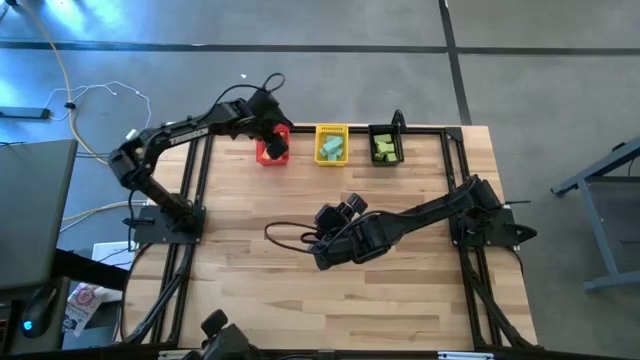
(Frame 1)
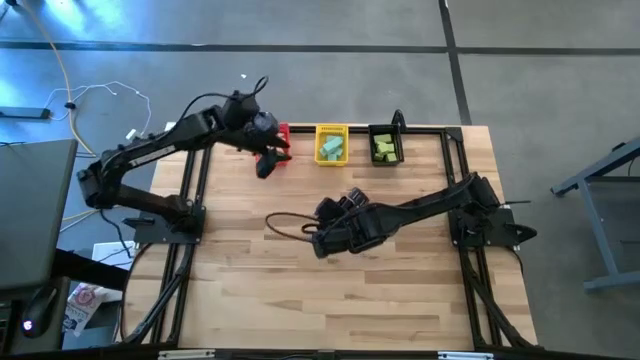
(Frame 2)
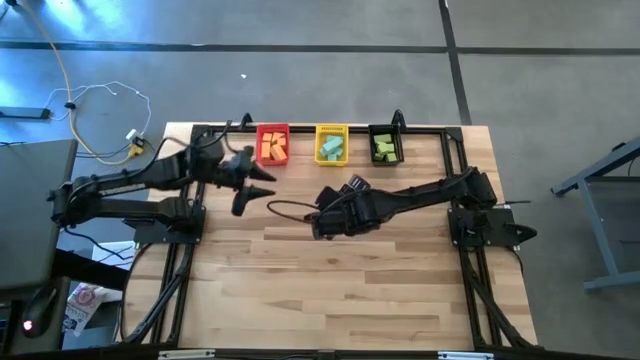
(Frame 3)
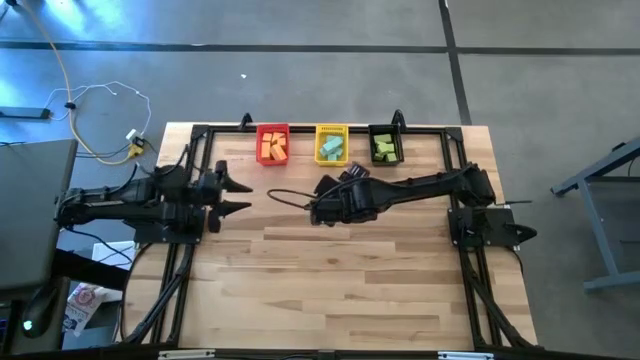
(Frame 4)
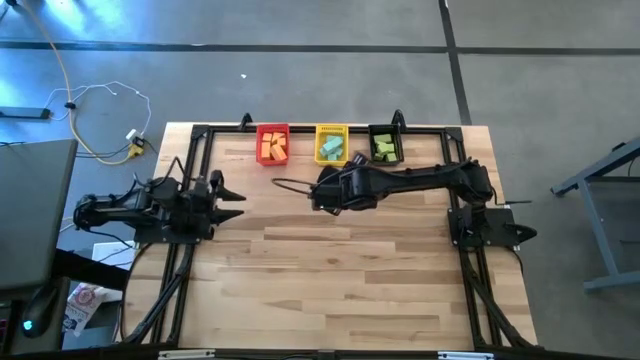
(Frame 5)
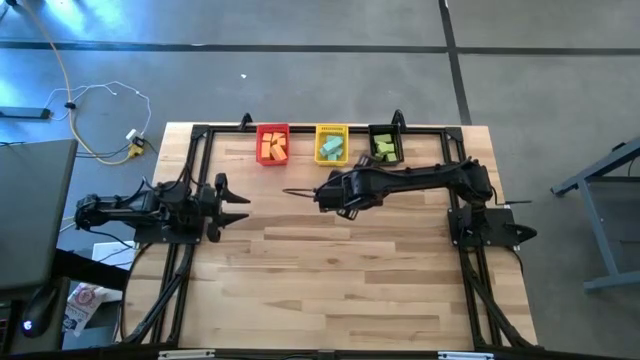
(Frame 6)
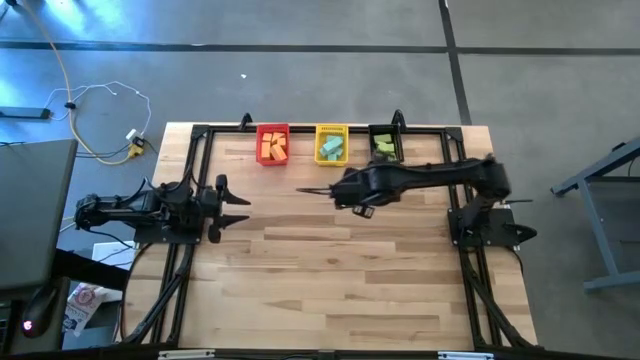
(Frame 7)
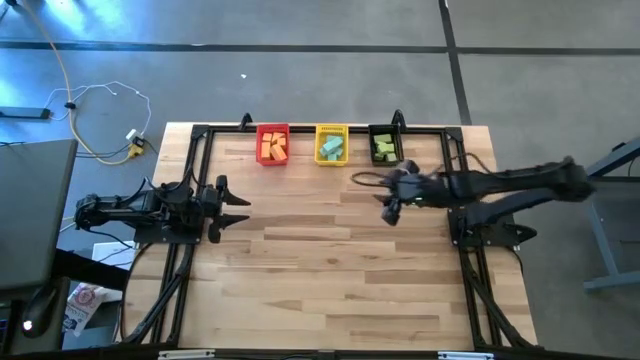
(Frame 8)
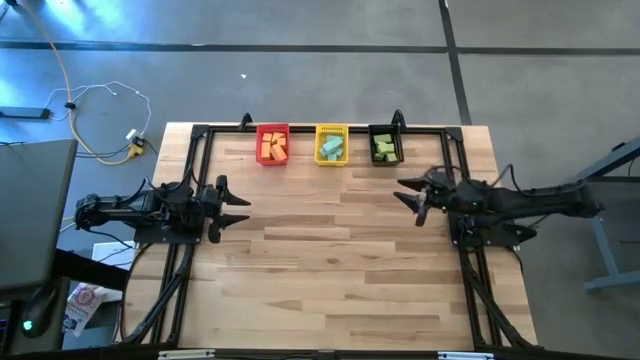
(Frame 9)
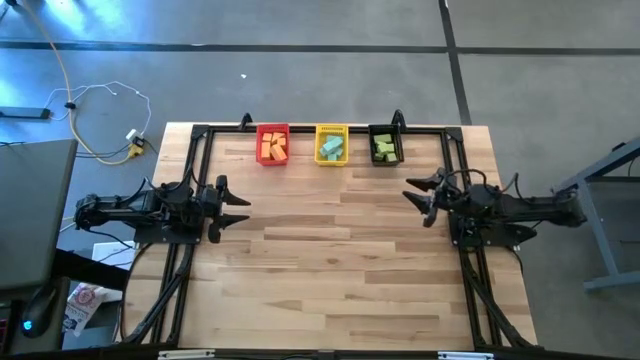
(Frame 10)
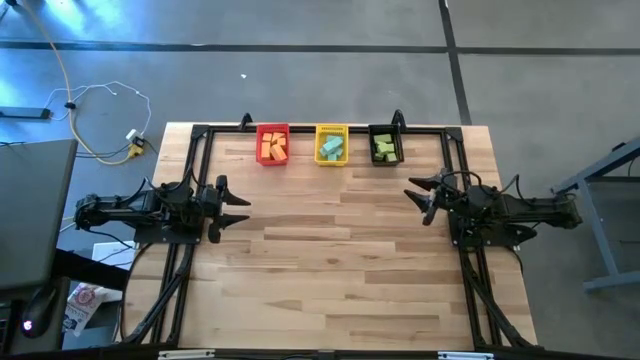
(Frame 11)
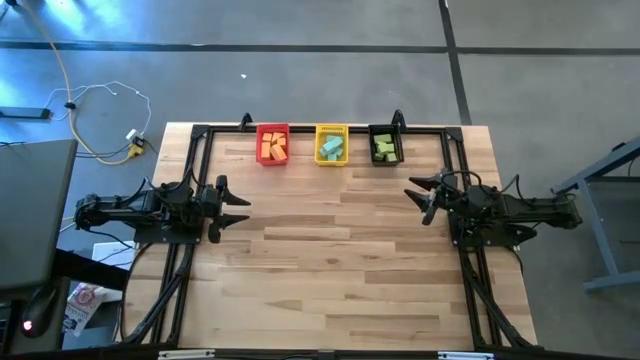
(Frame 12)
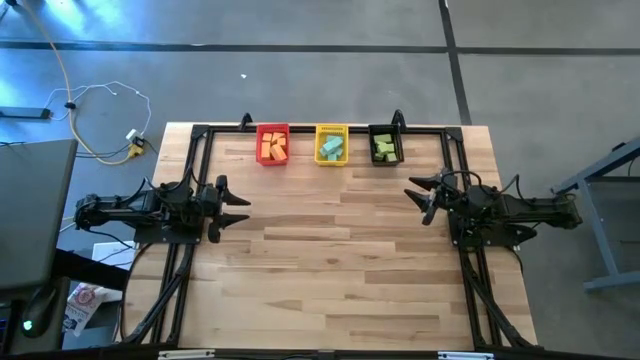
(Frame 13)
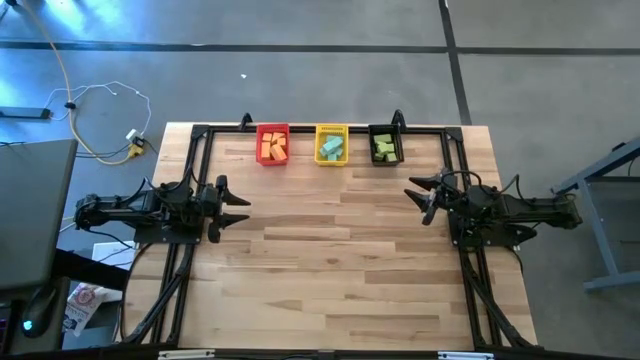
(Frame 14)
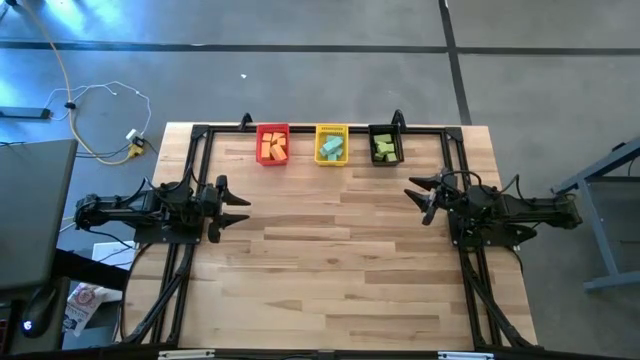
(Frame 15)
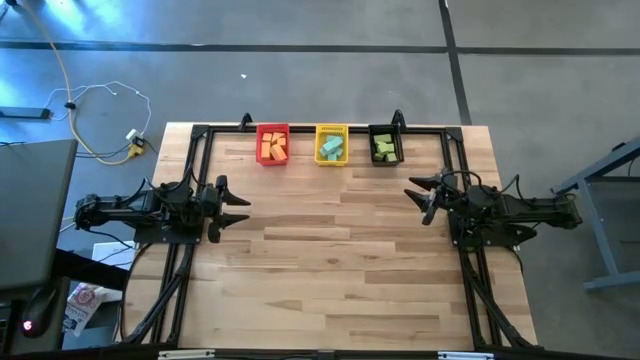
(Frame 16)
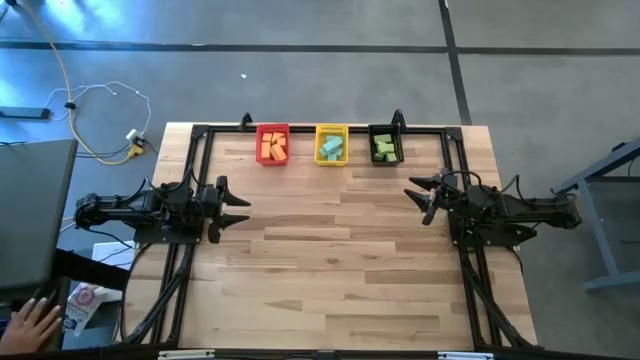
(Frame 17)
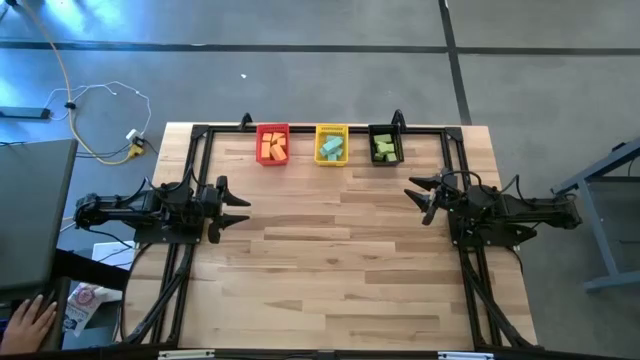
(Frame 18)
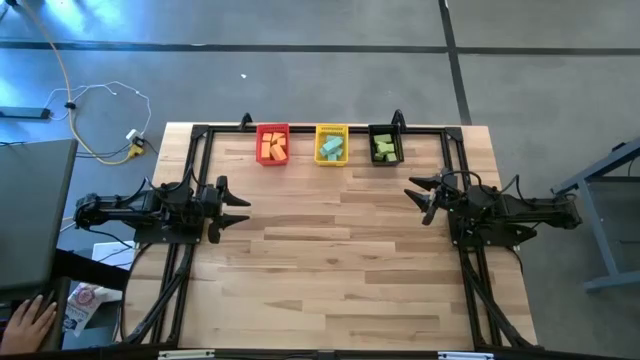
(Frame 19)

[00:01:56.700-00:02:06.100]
Task: Sort & place blocks by color
Return to Home Position

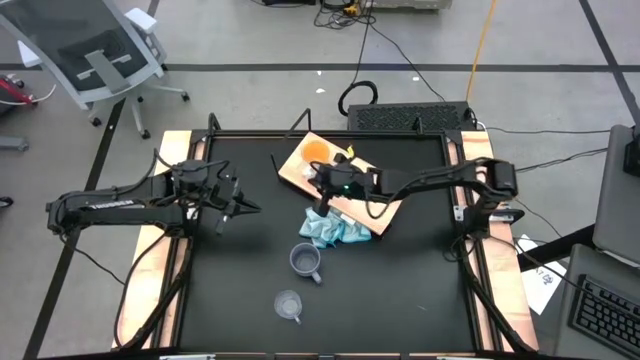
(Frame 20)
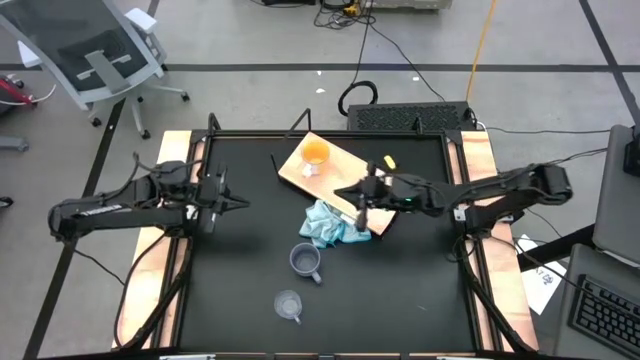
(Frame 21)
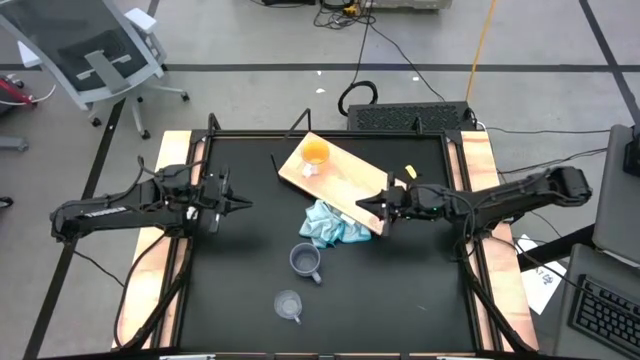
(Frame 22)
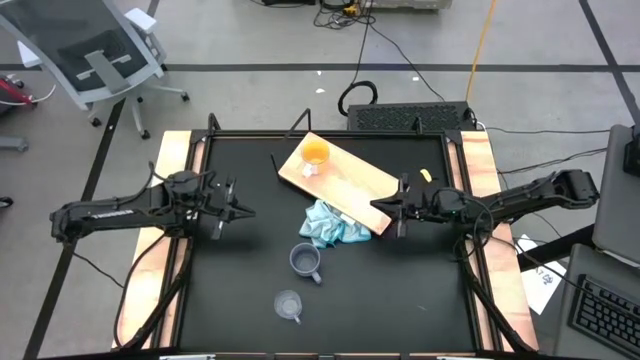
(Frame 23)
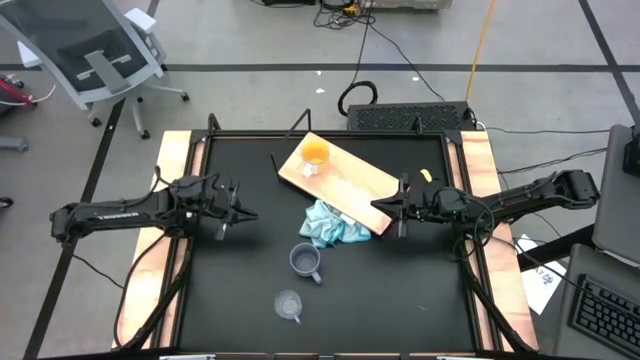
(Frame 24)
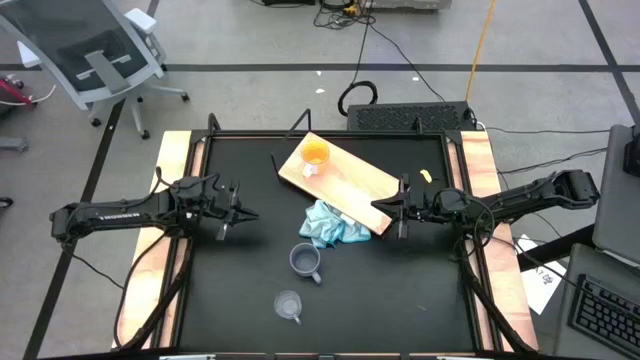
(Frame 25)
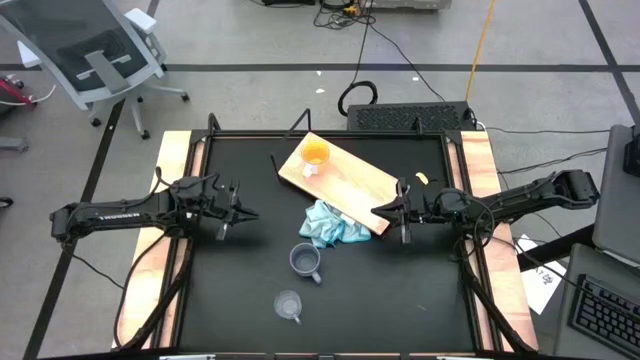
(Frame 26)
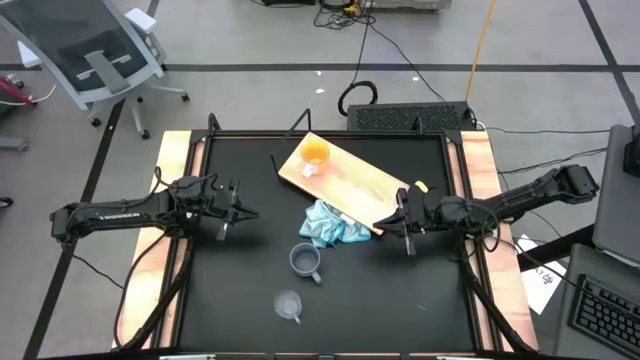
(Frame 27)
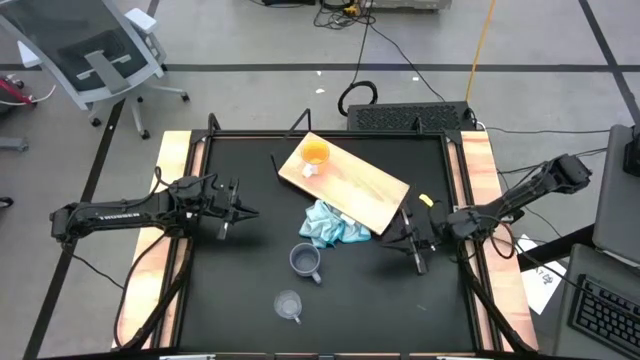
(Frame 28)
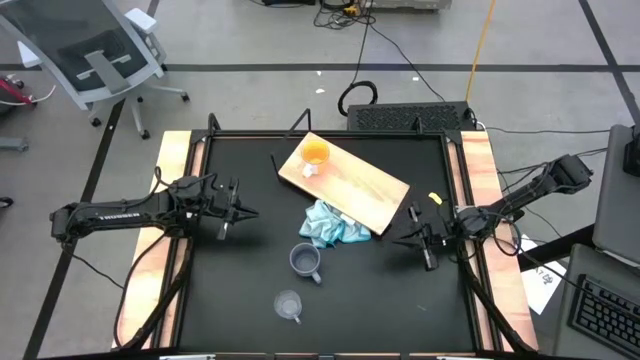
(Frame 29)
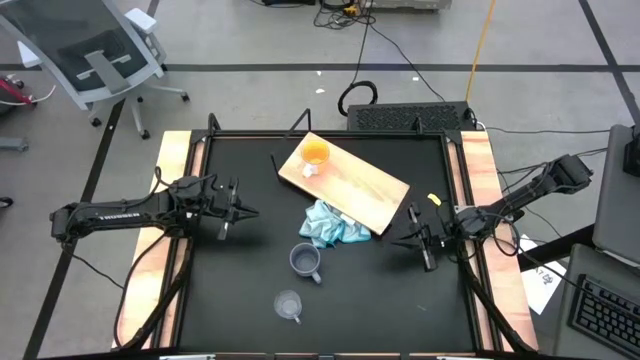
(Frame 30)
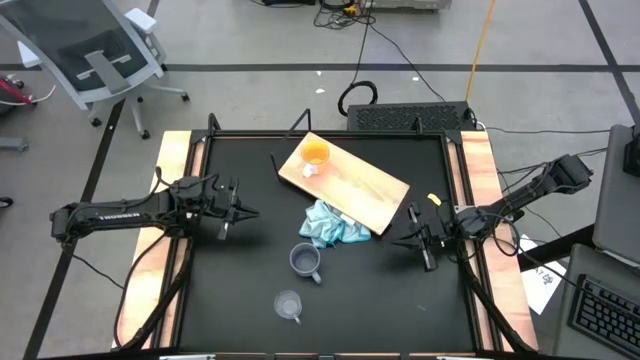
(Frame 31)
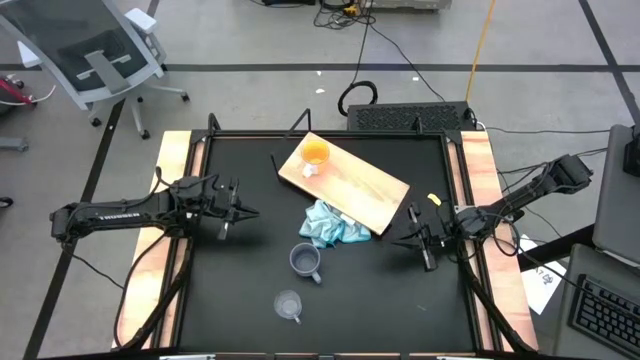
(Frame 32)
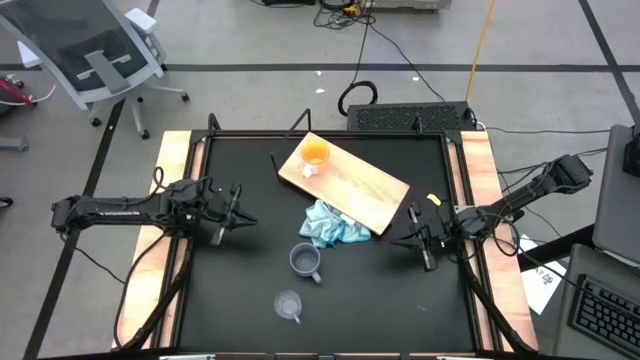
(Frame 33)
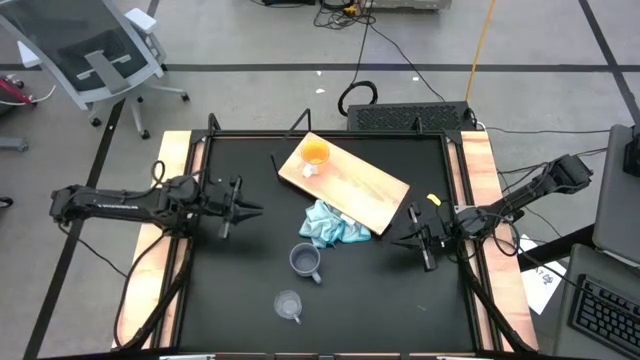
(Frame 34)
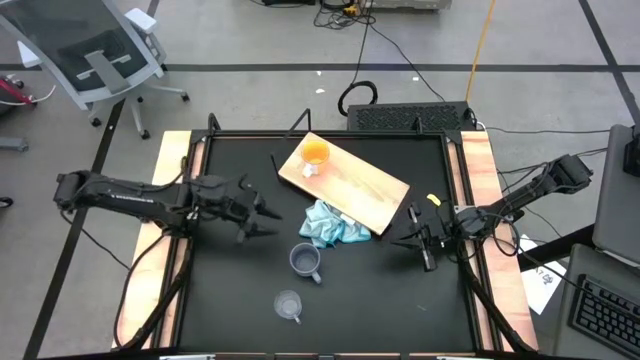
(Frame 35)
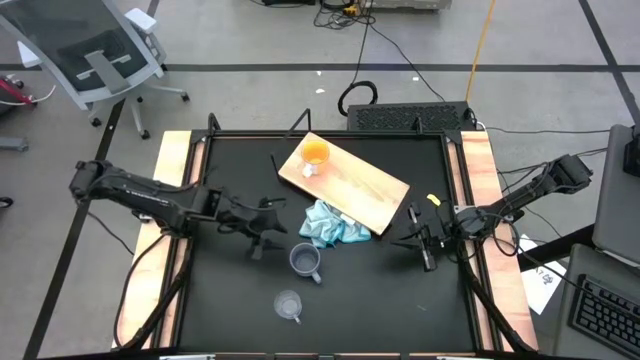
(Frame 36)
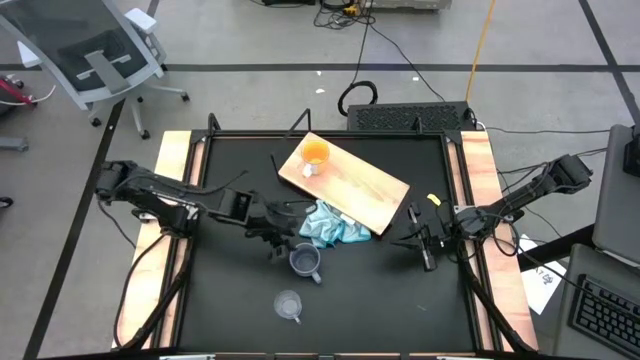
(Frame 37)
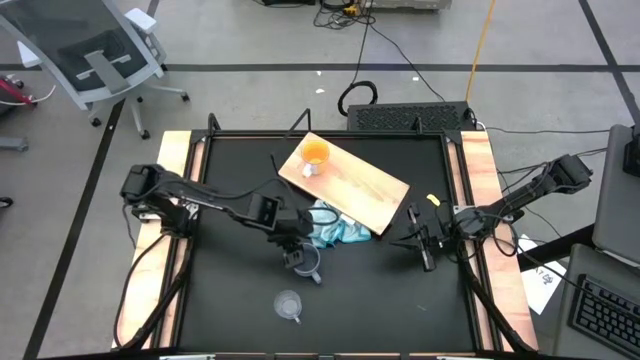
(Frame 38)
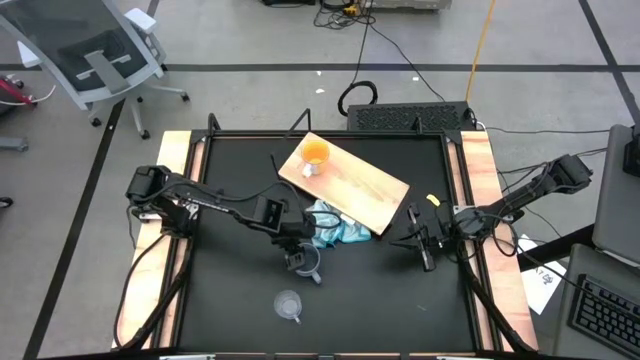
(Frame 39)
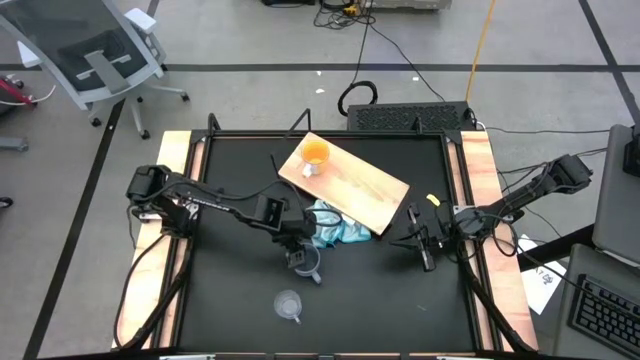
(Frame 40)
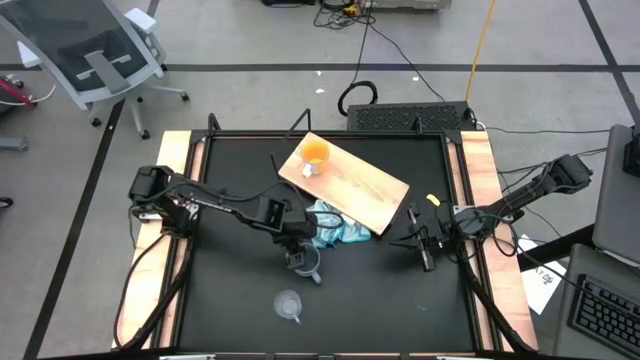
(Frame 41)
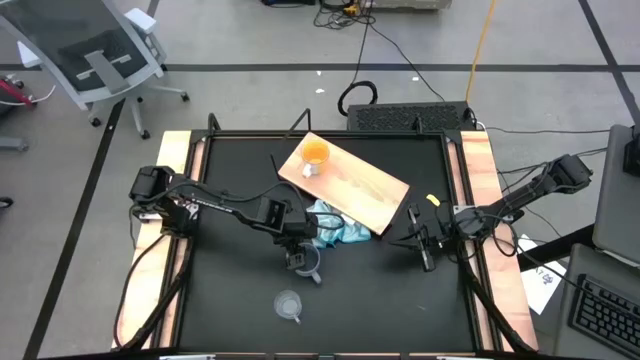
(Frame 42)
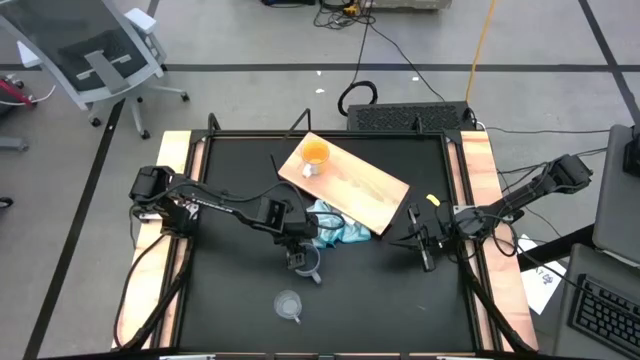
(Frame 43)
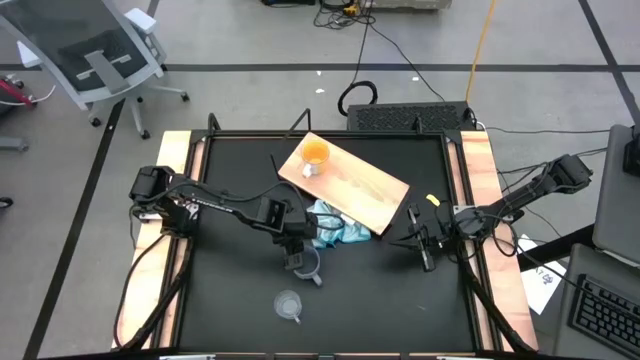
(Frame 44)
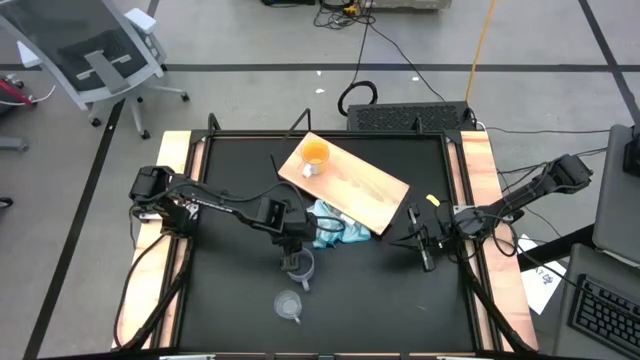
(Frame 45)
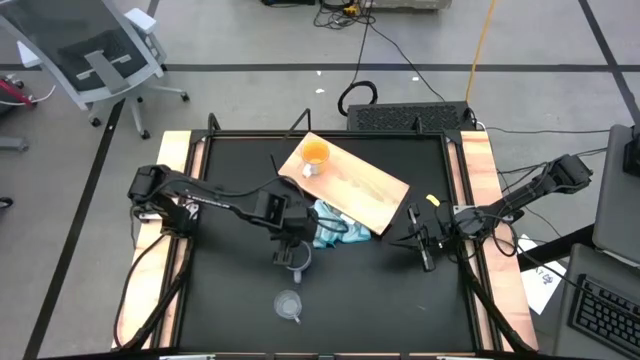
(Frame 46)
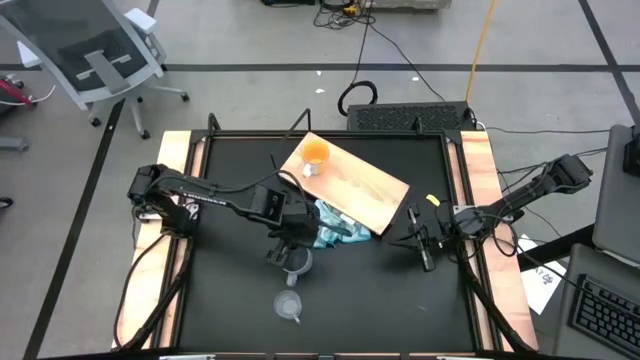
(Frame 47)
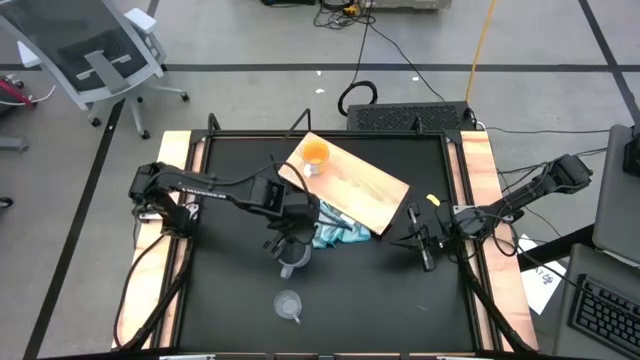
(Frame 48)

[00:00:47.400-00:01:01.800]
Task: Stack small to large cups/mugs on shelf
Put the gray mug on the shelf
